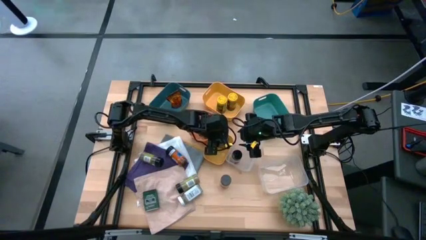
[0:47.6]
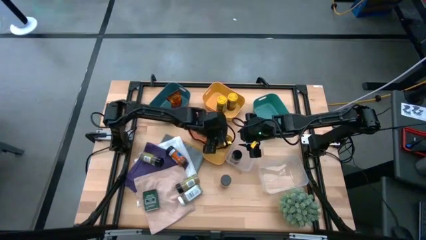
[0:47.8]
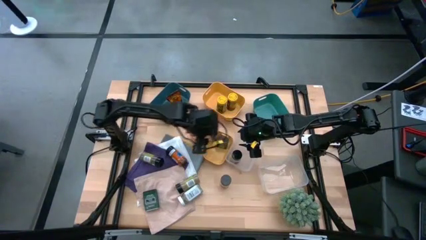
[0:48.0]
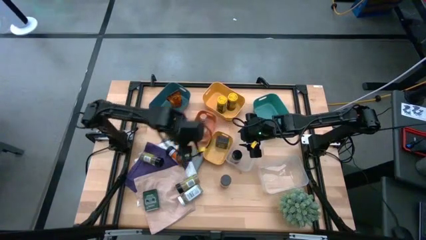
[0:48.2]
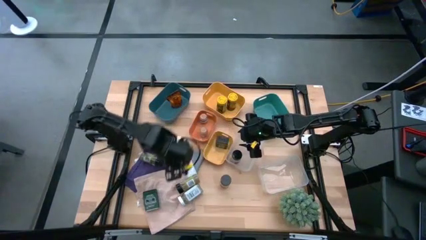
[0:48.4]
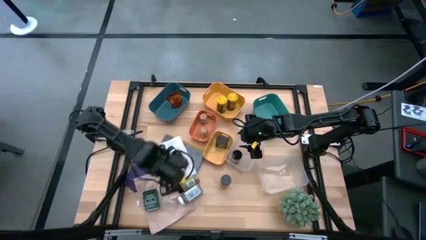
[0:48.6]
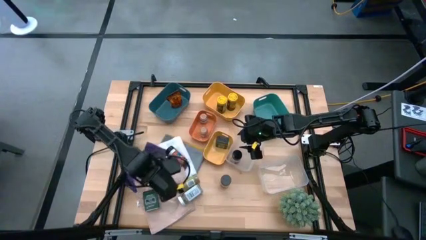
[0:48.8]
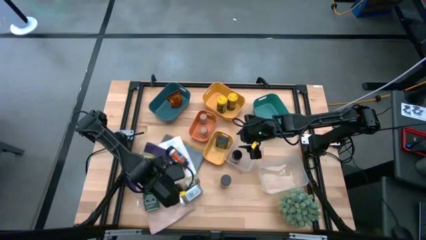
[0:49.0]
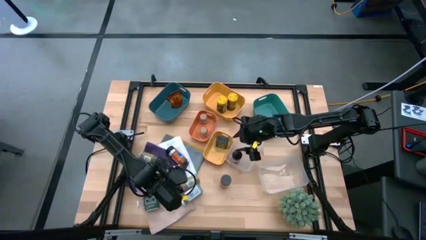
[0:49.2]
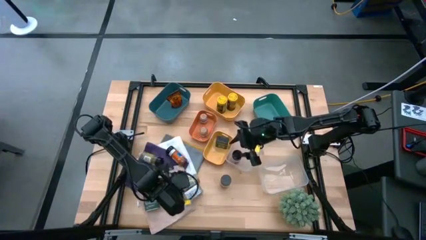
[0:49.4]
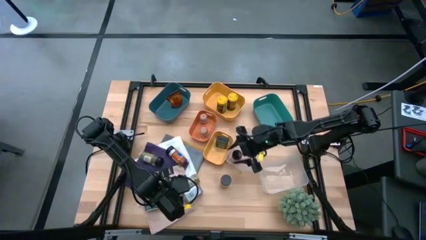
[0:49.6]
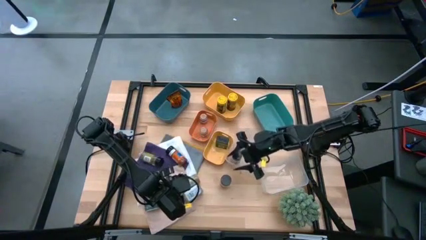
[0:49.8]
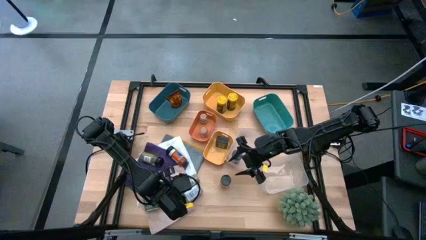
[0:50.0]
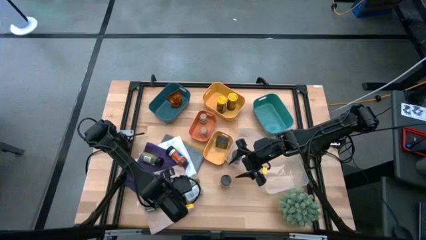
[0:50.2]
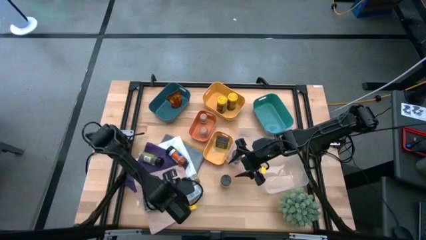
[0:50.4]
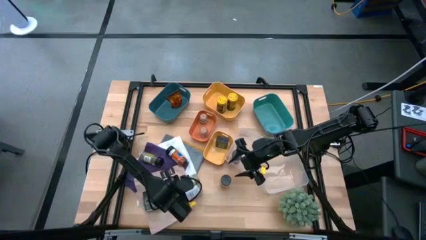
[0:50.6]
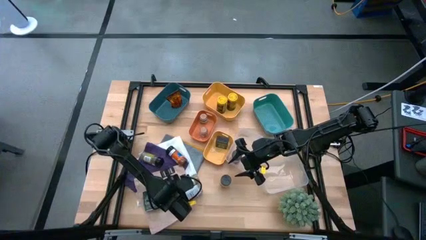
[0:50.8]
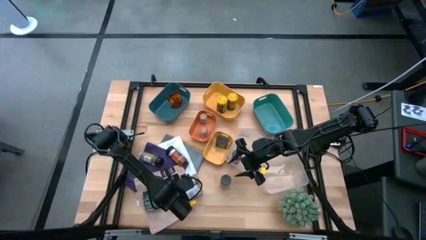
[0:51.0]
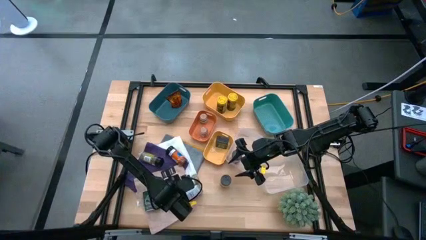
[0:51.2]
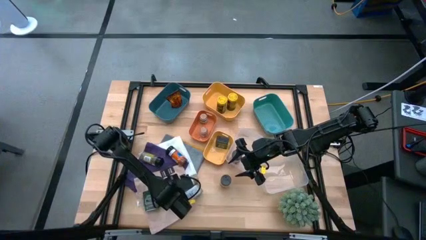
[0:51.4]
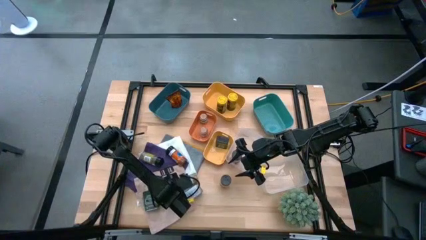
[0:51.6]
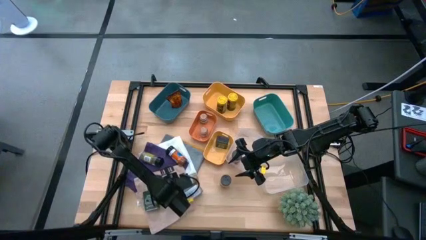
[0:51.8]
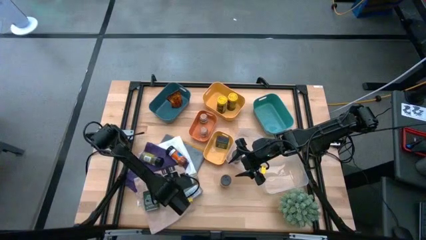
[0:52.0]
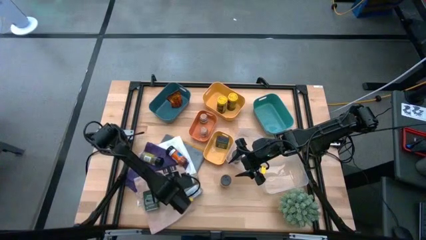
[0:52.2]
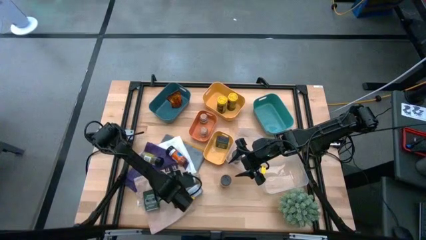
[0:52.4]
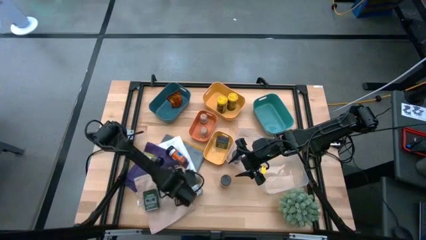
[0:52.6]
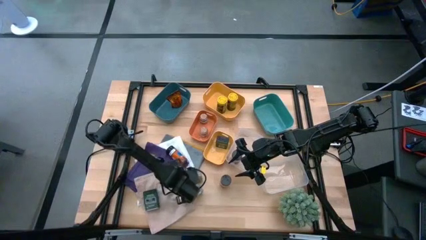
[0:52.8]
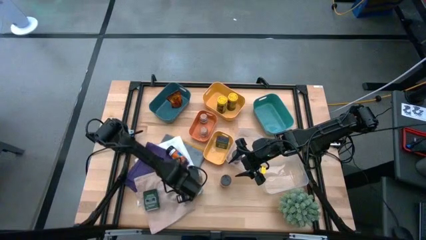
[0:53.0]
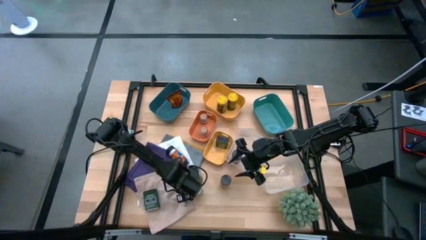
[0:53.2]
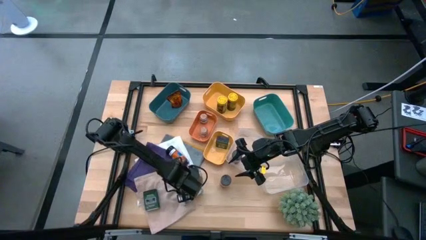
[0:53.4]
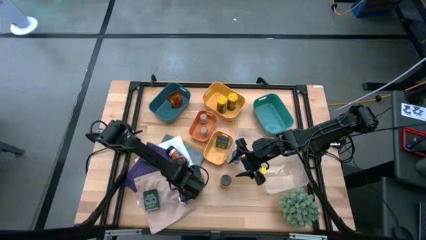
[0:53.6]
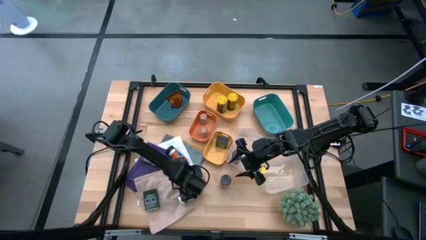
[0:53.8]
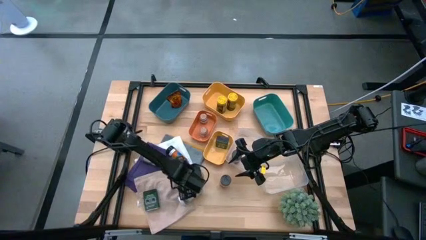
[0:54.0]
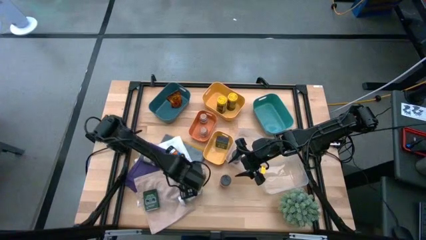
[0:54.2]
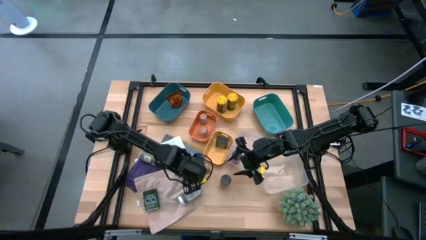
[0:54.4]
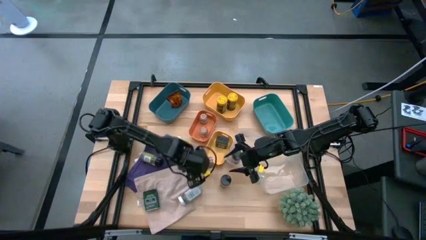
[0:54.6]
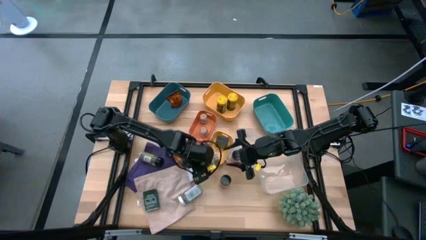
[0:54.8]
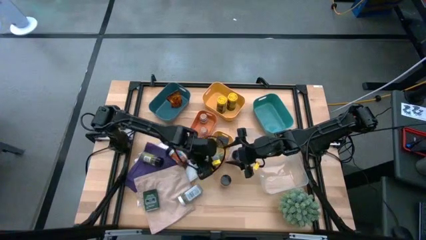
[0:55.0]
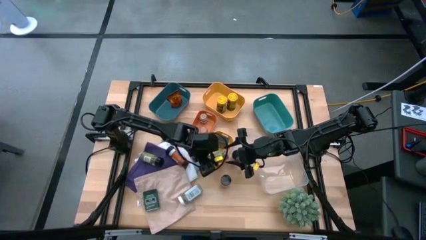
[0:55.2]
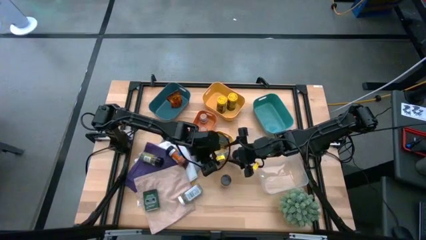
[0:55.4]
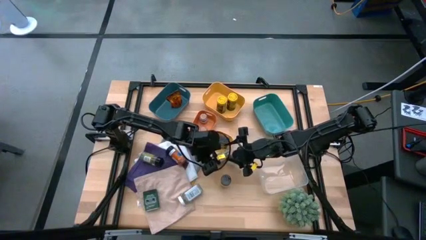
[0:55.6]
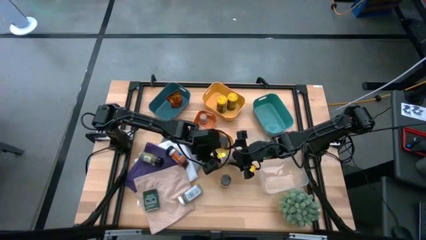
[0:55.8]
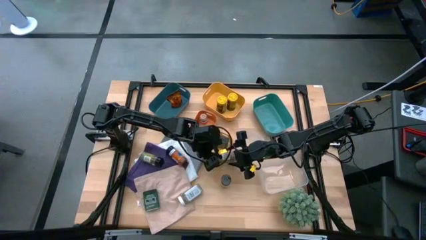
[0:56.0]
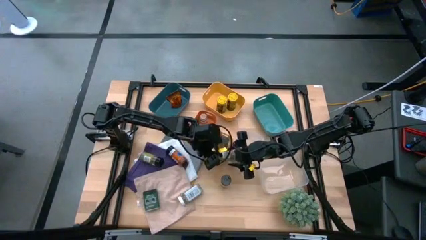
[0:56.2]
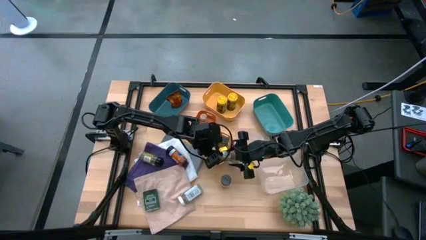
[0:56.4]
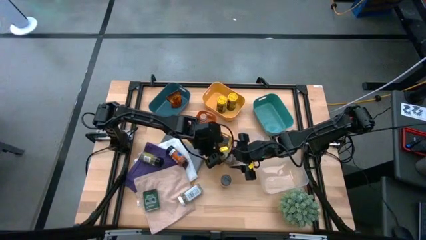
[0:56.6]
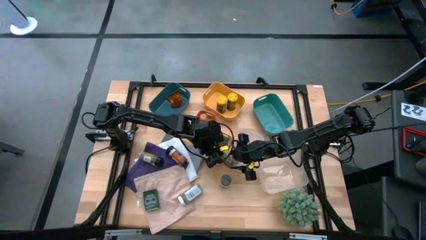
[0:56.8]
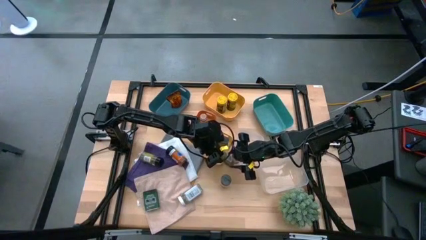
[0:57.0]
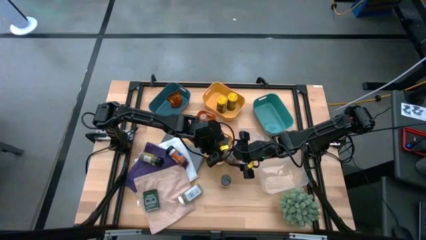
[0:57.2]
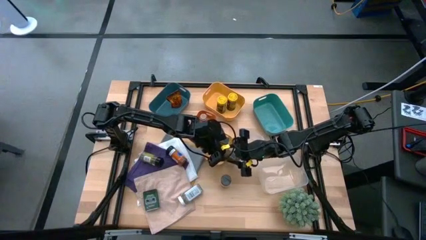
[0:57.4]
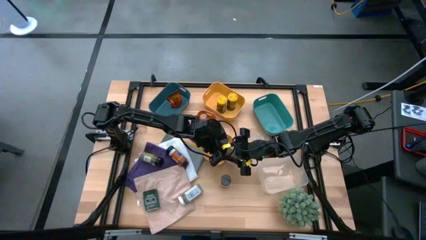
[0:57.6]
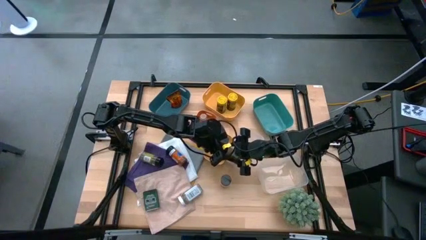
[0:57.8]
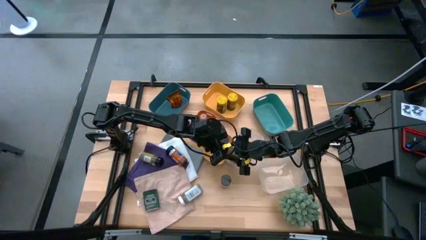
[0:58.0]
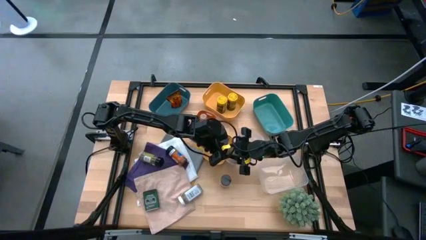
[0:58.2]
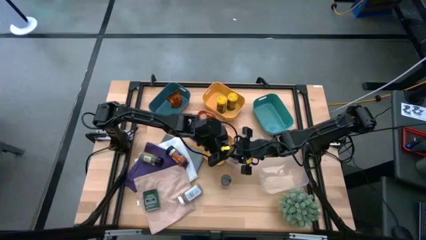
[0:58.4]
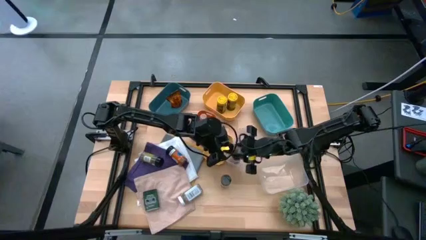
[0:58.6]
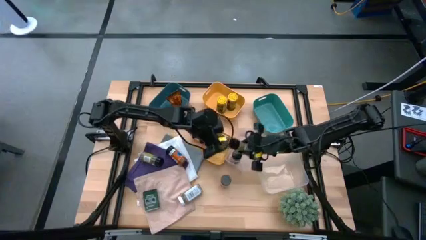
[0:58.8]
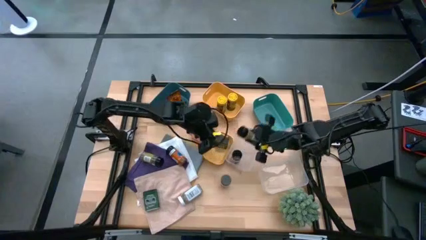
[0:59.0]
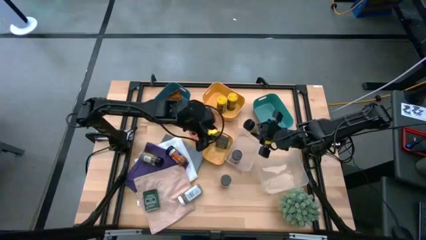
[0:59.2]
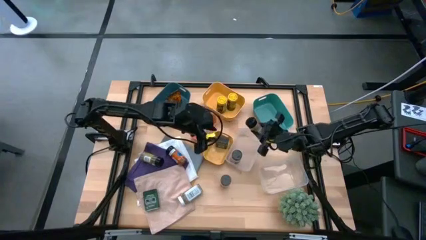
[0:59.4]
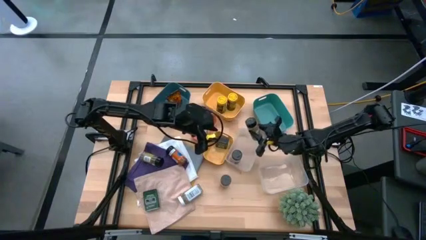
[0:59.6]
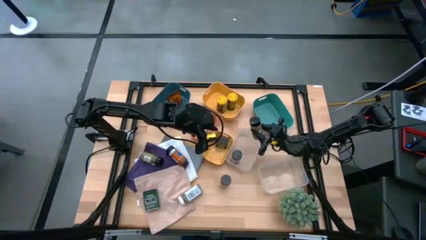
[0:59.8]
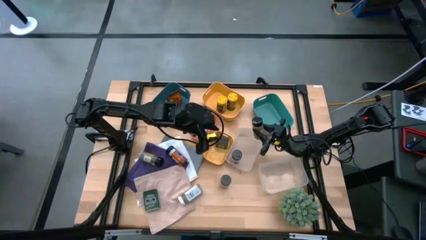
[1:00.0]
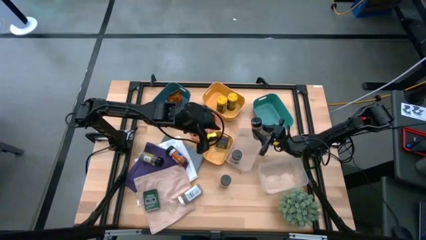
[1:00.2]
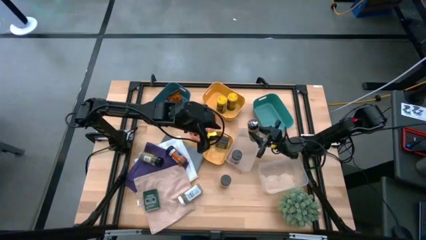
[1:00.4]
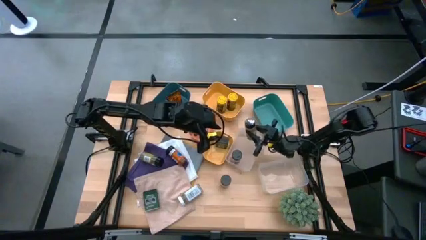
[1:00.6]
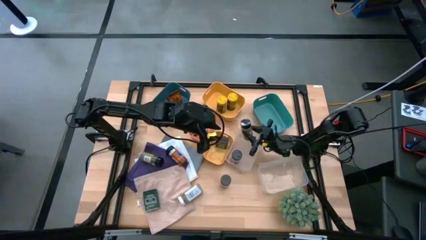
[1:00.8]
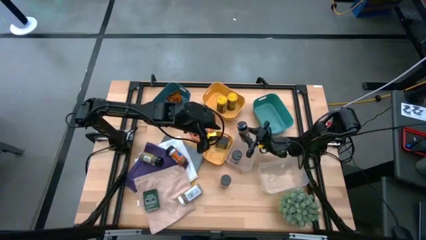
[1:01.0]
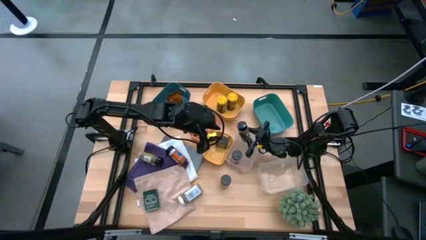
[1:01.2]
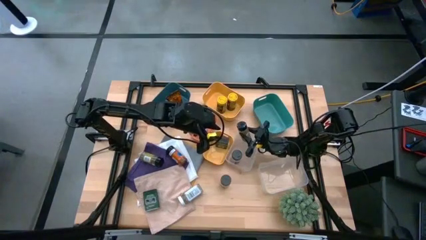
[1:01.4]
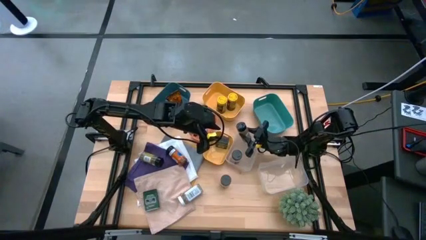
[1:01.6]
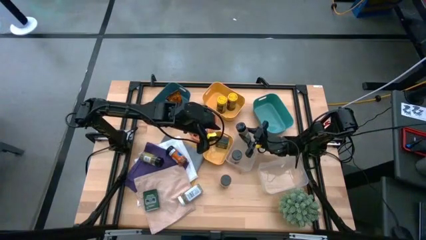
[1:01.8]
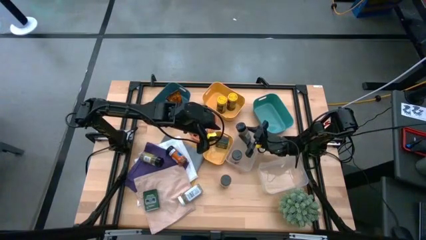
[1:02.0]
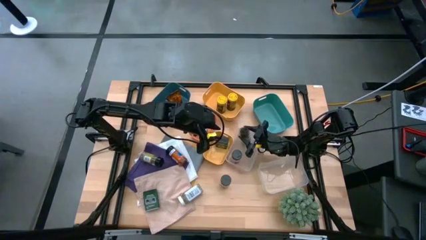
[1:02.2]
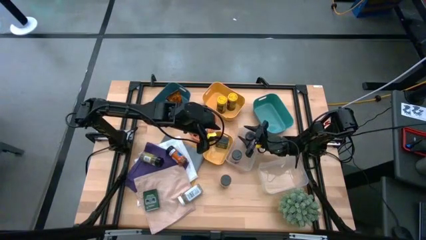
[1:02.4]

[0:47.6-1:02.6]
Task: Sort spices by type
Put the black seasoning bottle into the left white bin
